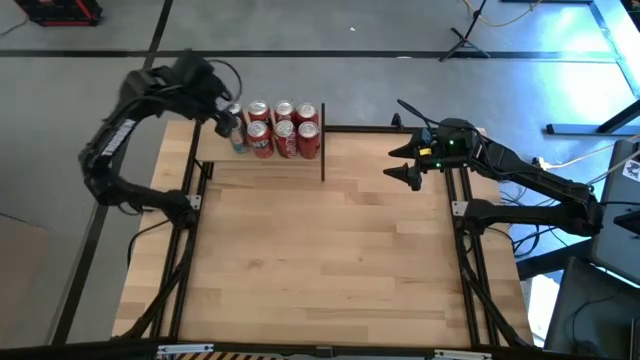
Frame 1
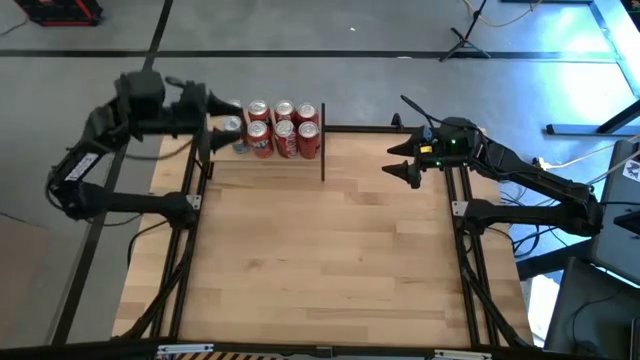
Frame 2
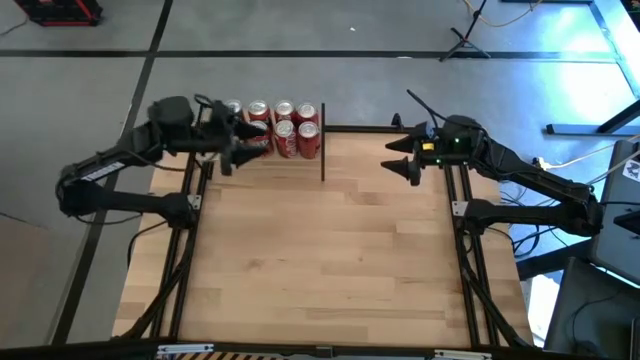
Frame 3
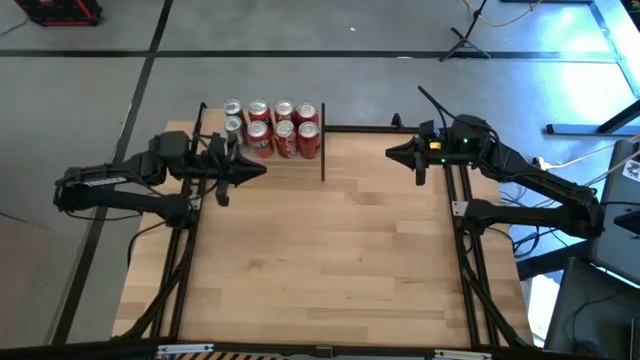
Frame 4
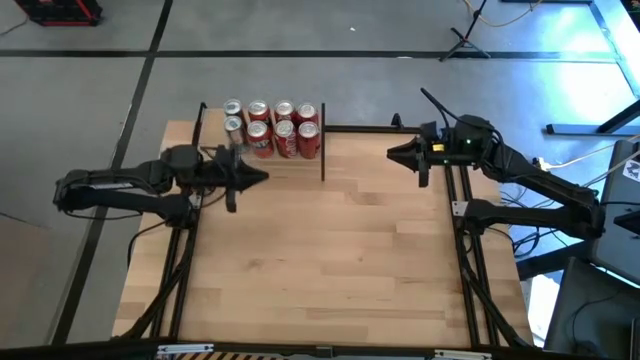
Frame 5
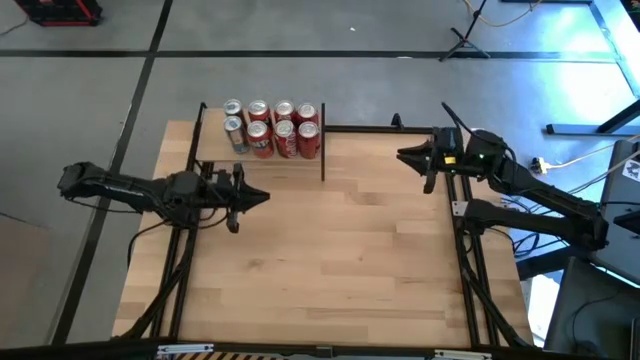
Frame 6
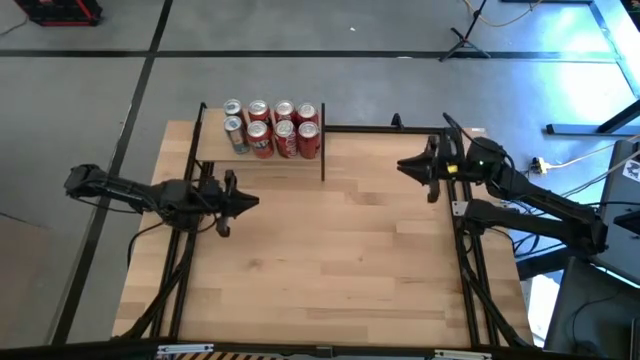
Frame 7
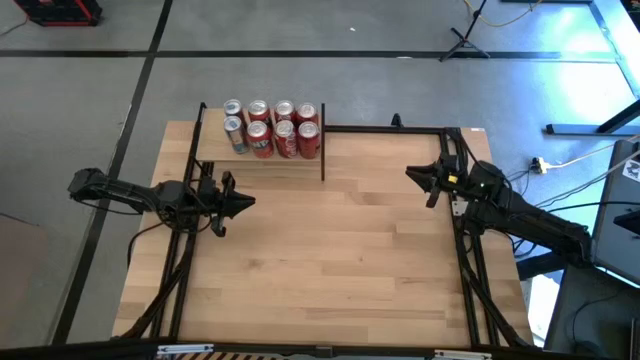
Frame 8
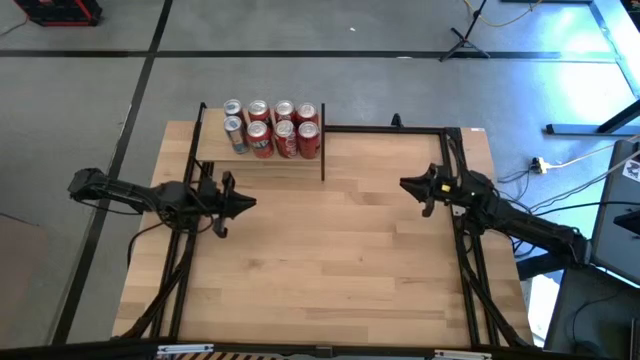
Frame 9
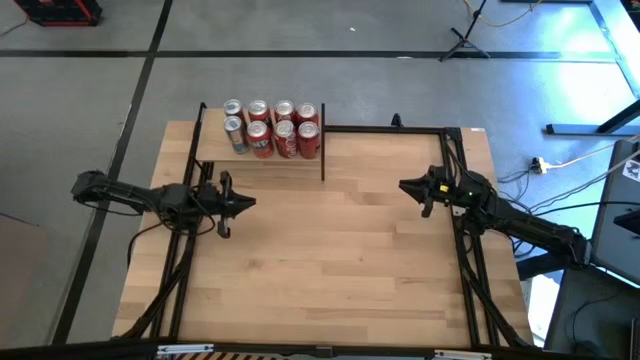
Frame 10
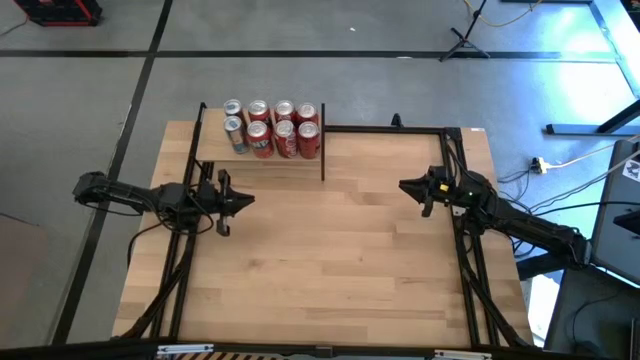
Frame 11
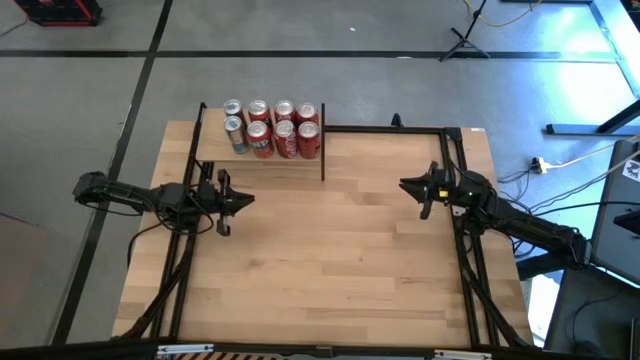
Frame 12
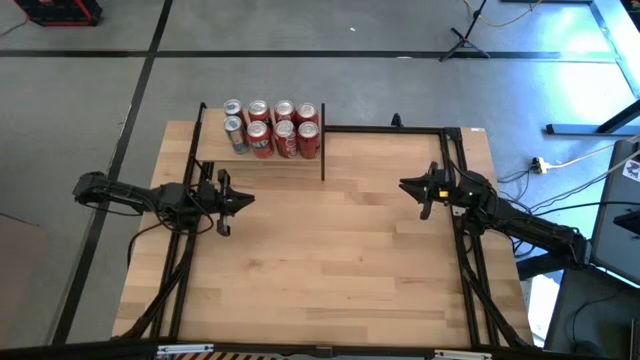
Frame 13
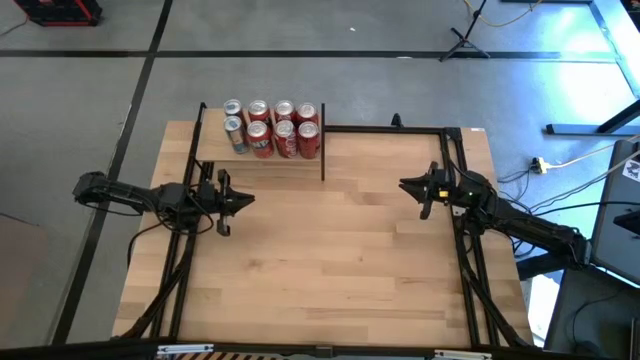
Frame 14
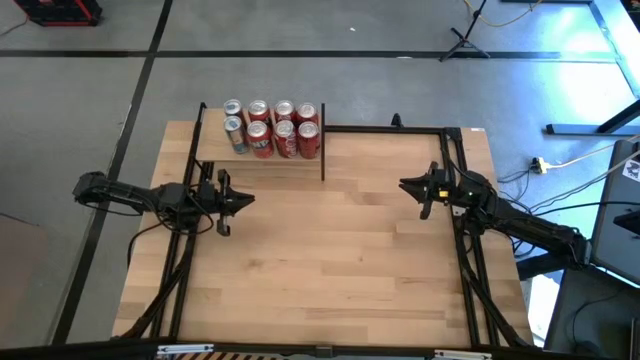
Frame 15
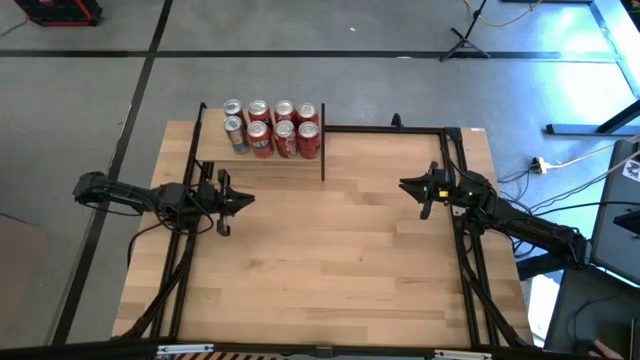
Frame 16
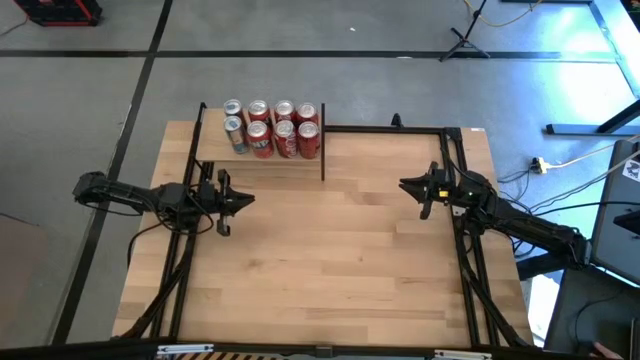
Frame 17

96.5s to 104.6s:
Task: Place canned beverage on shelf
Return to Home Position

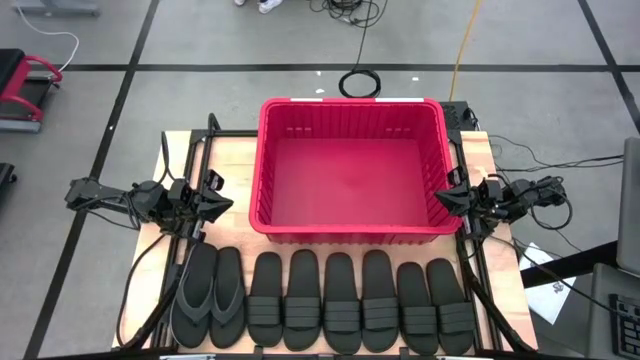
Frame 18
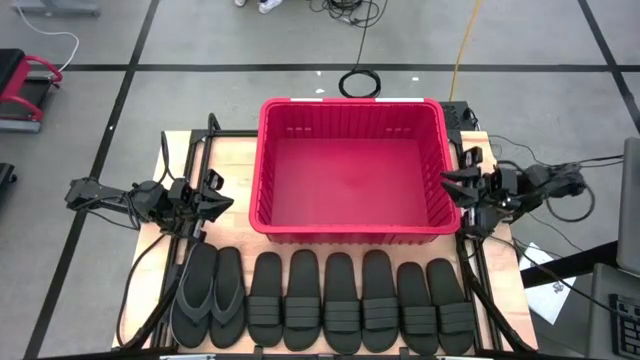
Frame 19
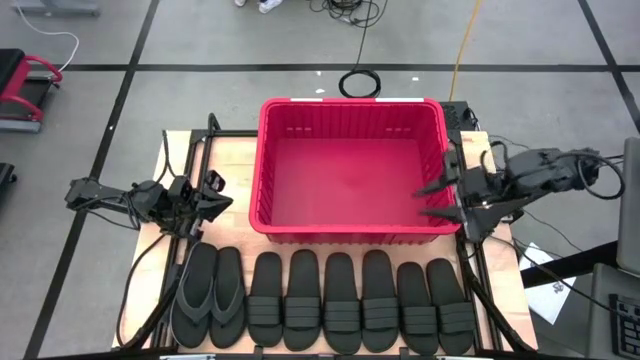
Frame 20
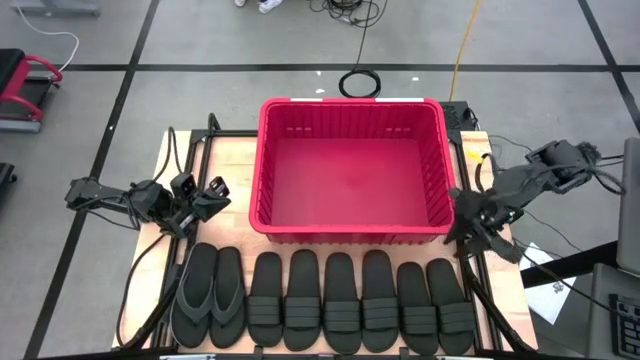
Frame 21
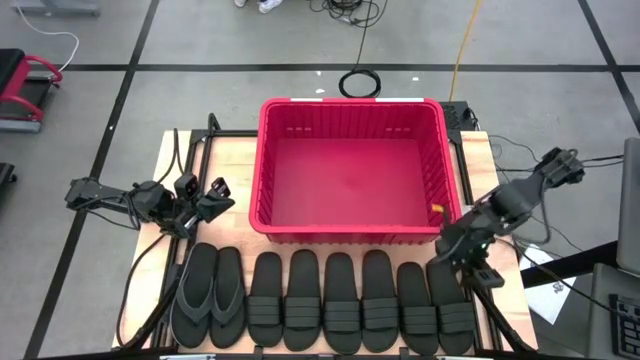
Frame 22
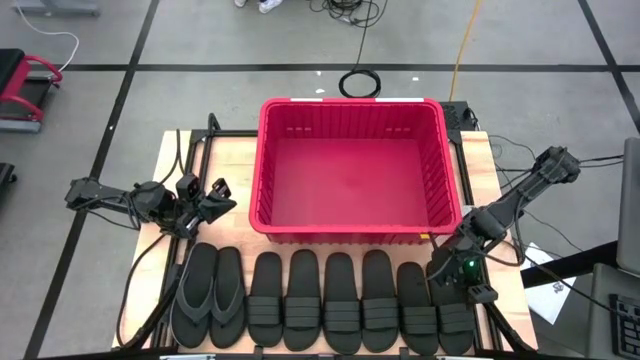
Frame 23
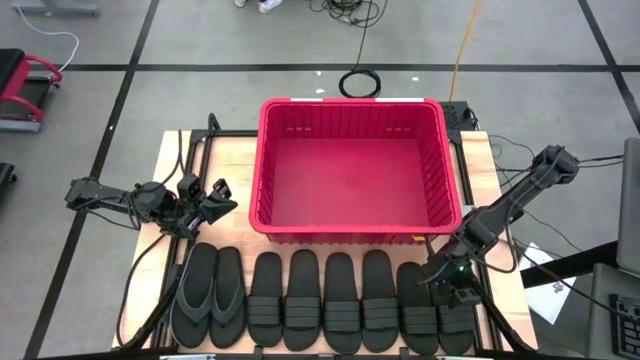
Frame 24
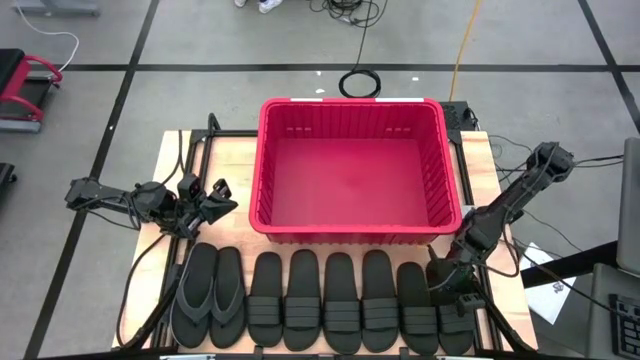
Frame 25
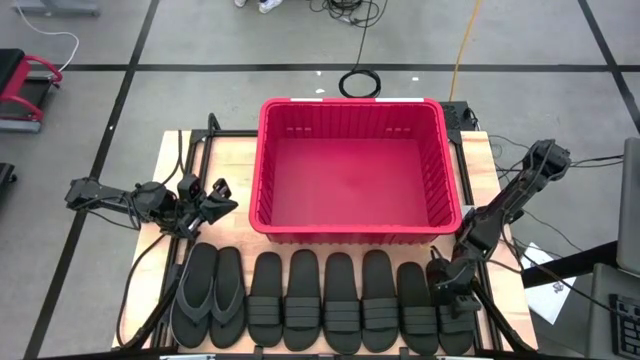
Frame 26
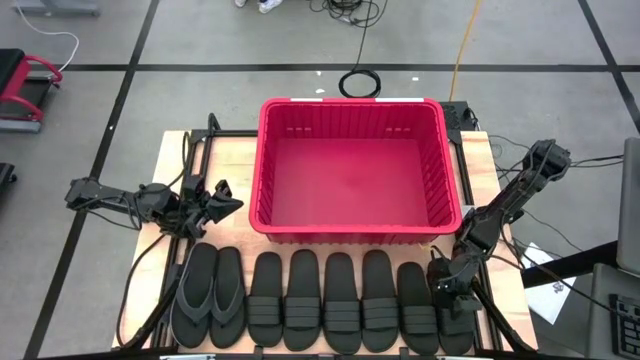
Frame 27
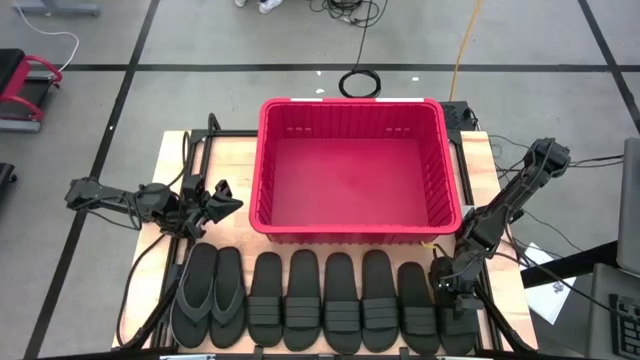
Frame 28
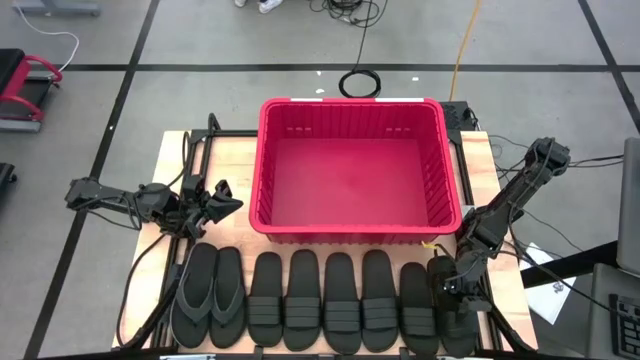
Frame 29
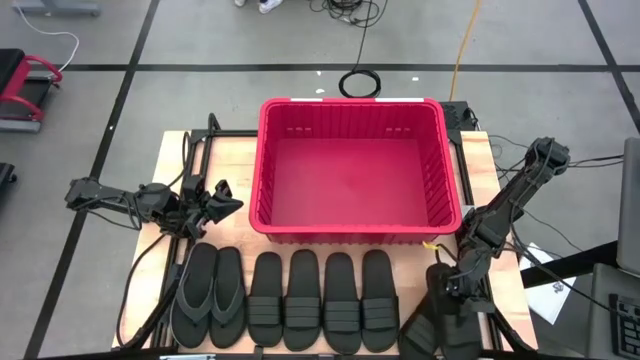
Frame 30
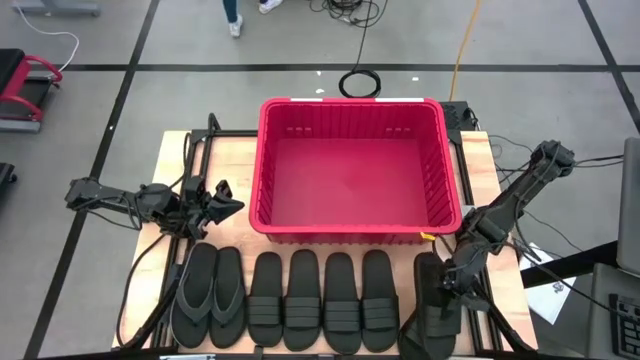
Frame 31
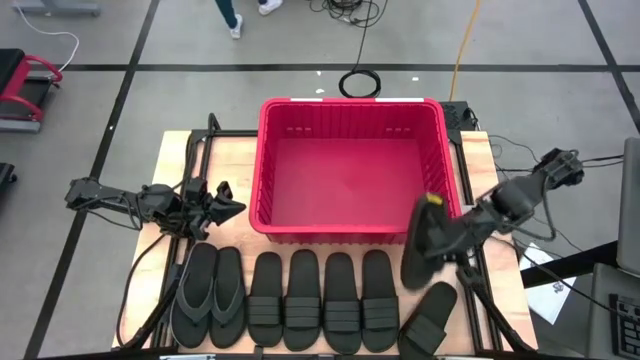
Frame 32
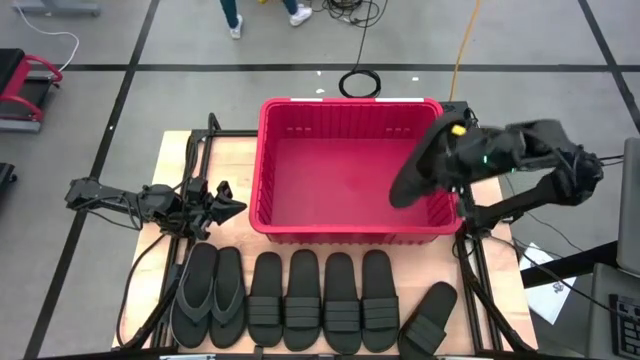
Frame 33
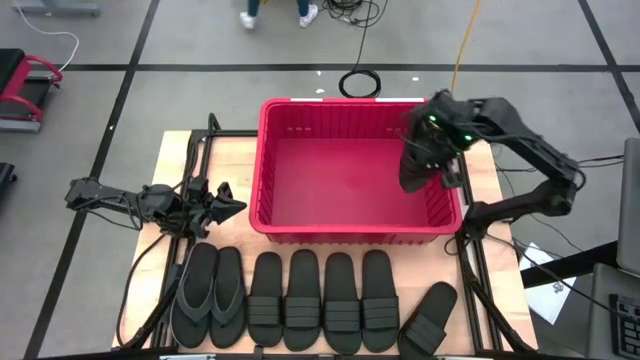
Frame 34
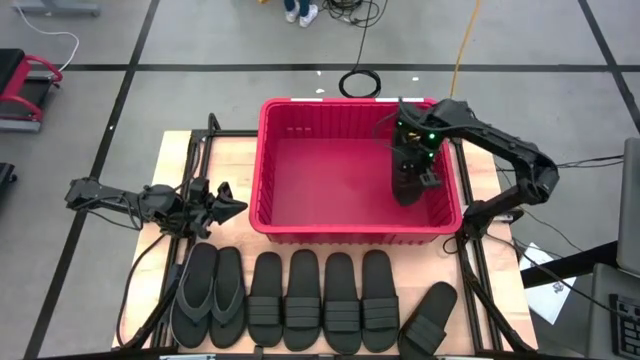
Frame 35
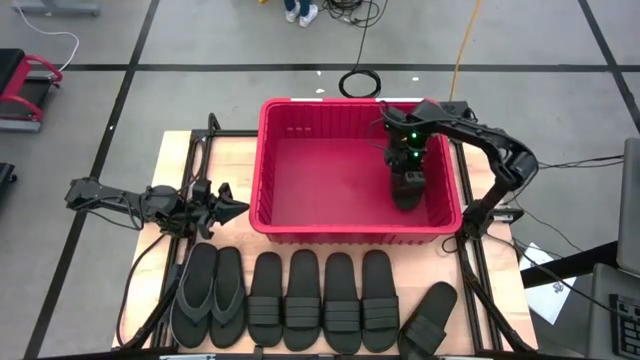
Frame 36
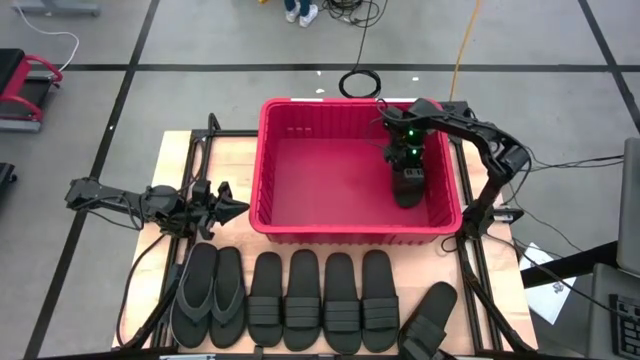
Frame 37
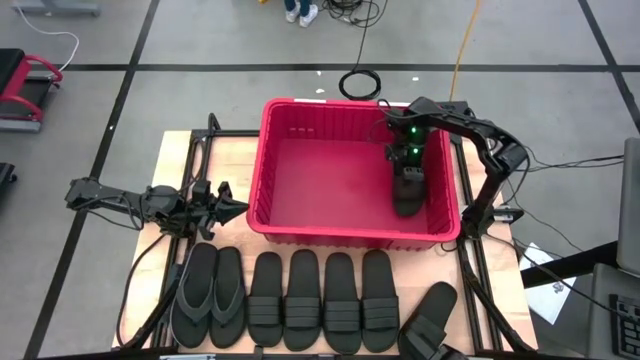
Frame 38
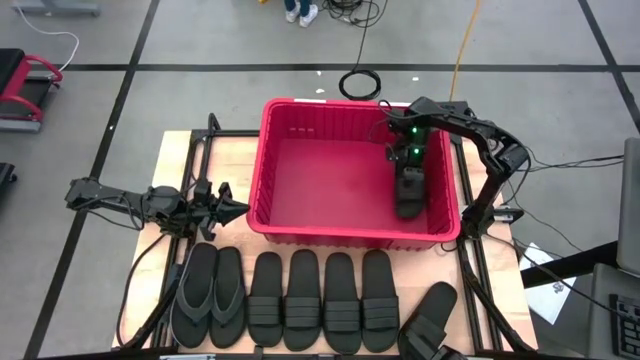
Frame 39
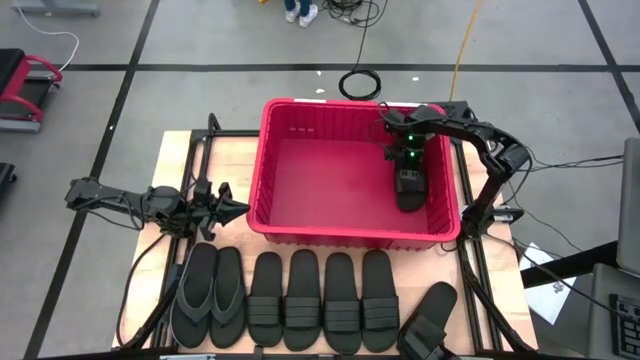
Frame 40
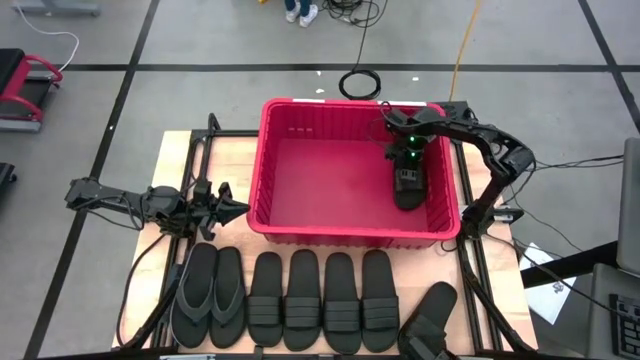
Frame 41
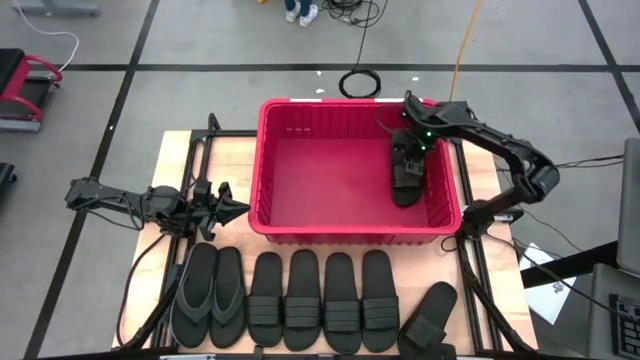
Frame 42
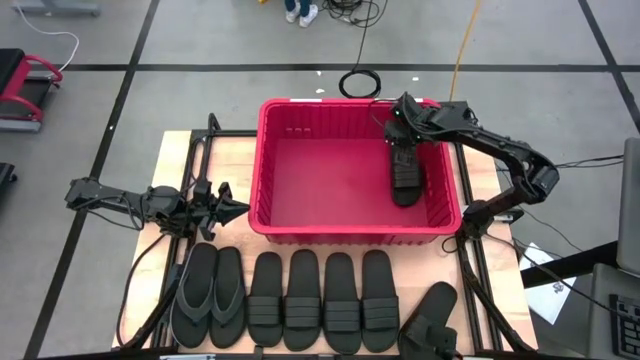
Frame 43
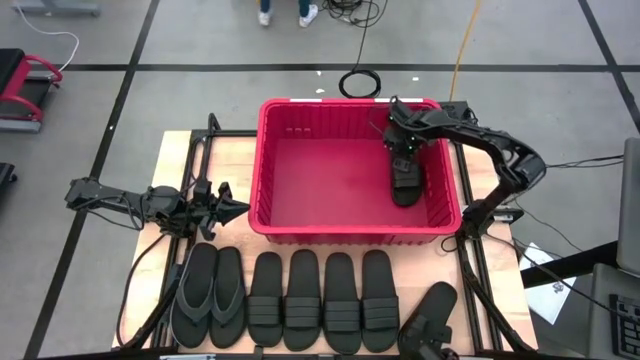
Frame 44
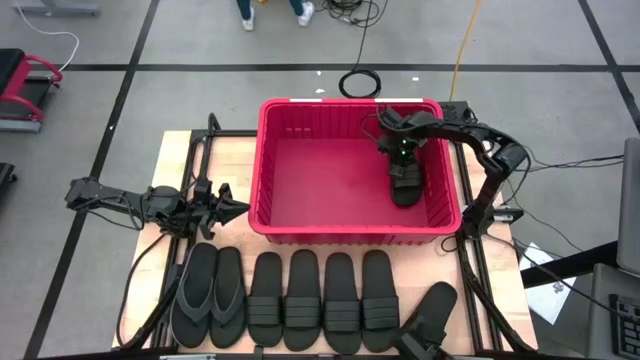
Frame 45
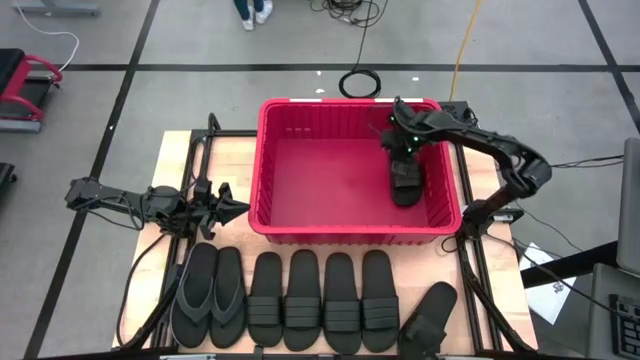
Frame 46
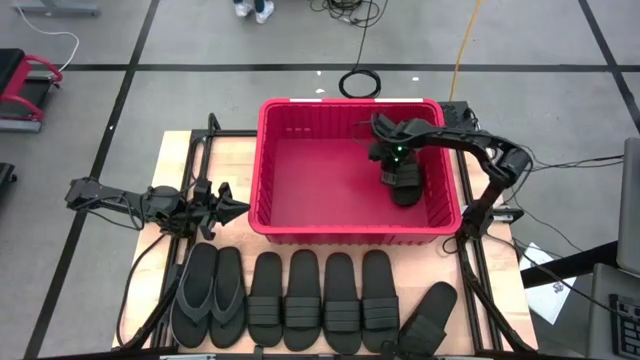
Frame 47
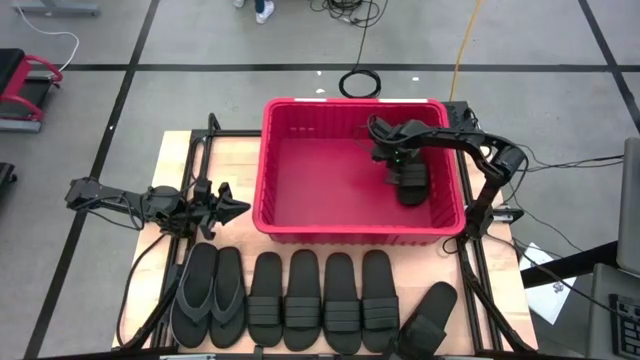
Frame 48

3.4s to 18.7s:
Task: Pick and place slides into bin
Put the black slide into the red bin
